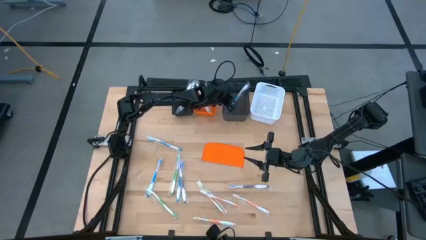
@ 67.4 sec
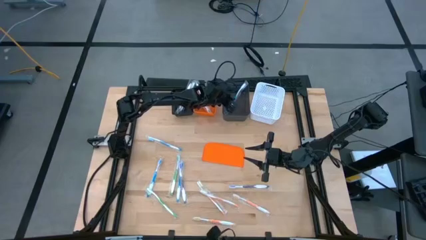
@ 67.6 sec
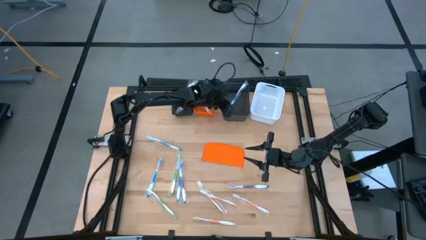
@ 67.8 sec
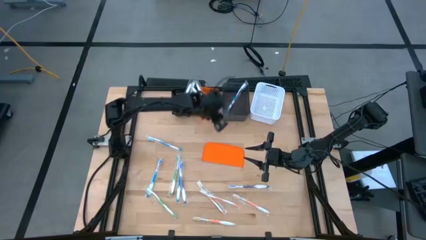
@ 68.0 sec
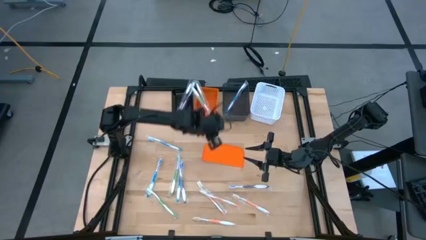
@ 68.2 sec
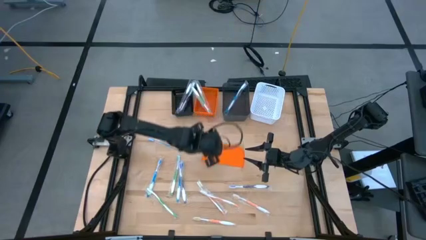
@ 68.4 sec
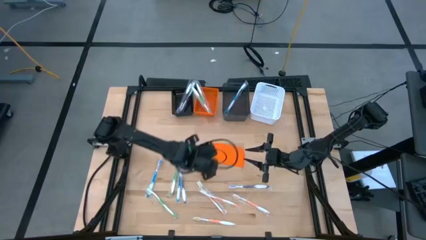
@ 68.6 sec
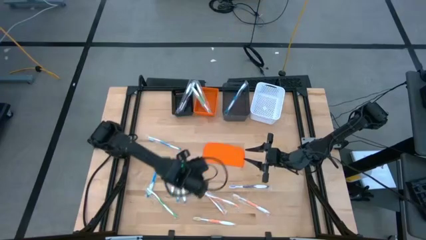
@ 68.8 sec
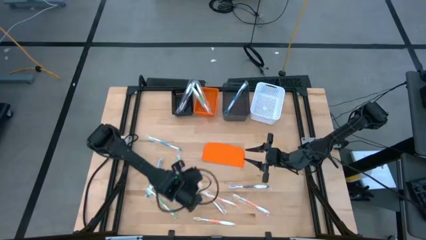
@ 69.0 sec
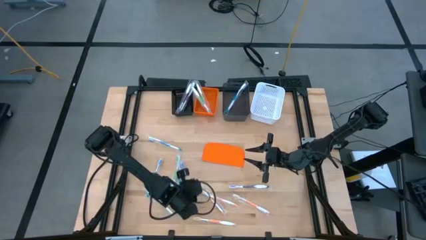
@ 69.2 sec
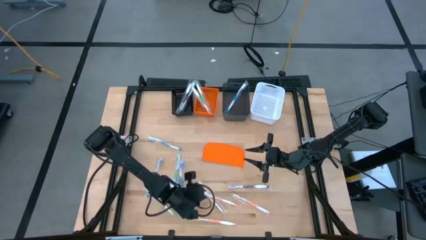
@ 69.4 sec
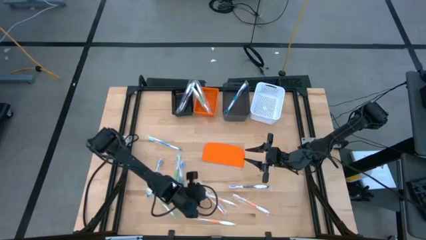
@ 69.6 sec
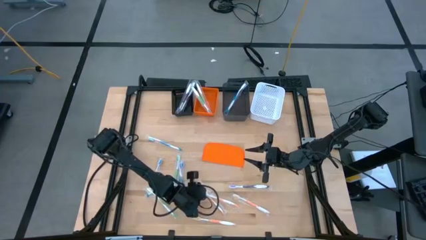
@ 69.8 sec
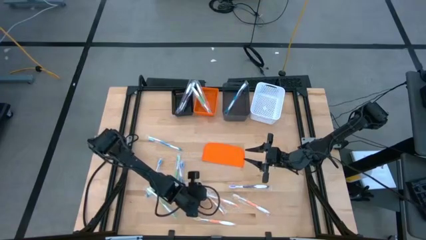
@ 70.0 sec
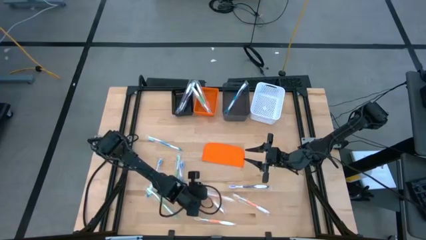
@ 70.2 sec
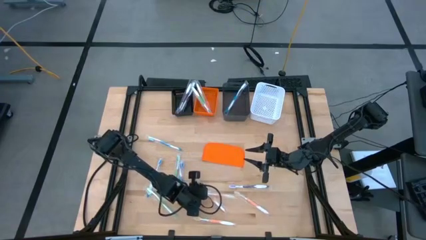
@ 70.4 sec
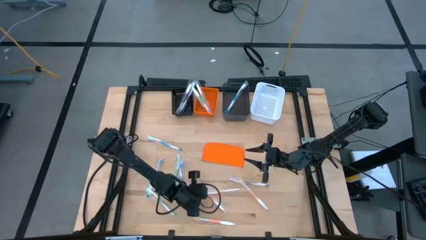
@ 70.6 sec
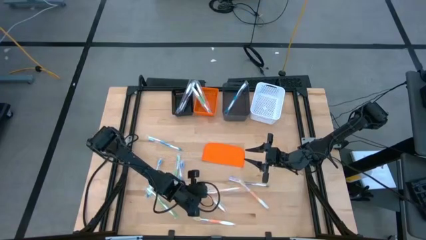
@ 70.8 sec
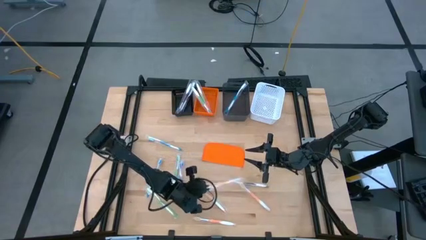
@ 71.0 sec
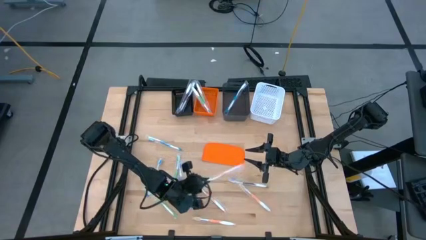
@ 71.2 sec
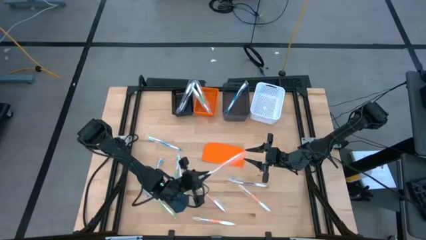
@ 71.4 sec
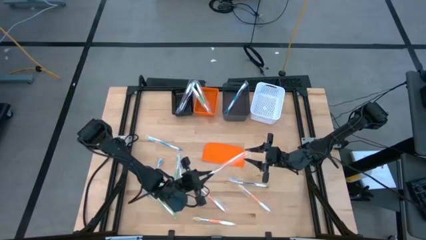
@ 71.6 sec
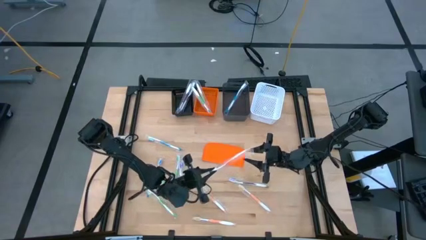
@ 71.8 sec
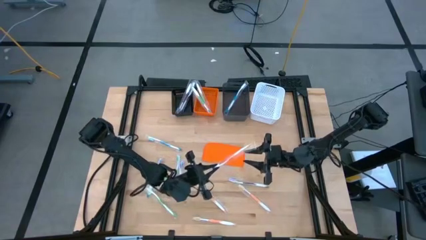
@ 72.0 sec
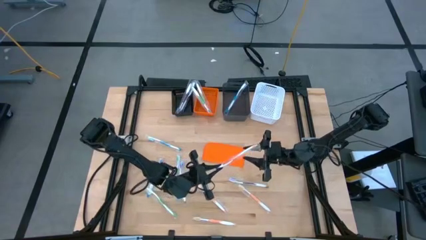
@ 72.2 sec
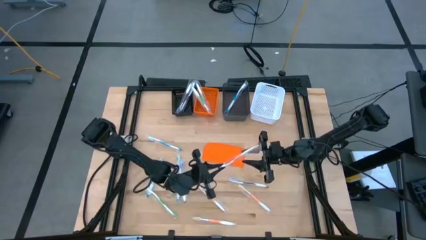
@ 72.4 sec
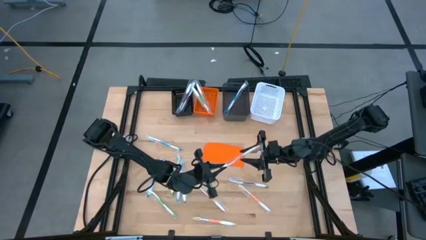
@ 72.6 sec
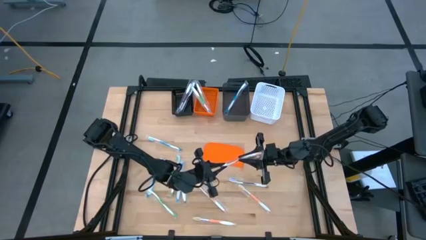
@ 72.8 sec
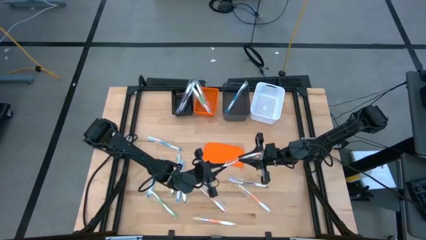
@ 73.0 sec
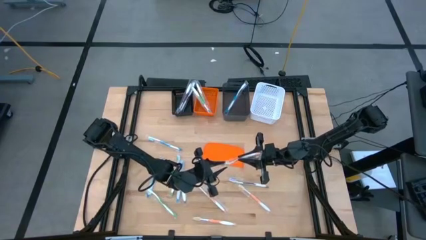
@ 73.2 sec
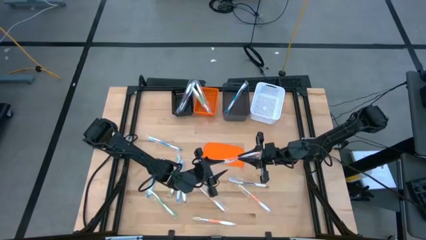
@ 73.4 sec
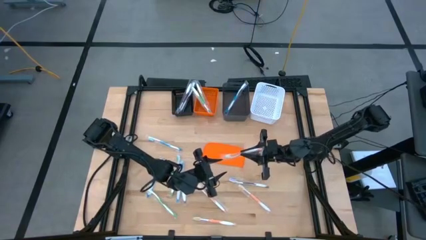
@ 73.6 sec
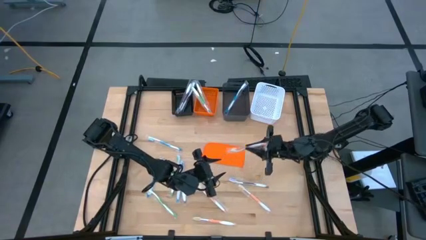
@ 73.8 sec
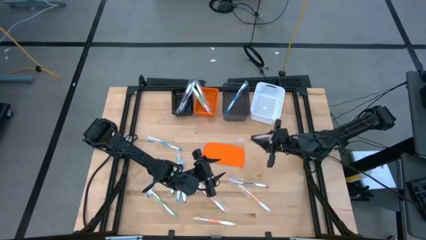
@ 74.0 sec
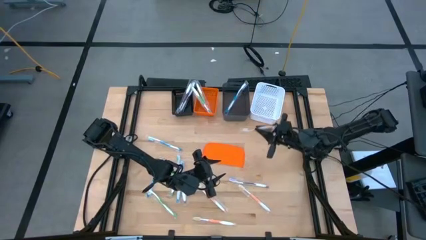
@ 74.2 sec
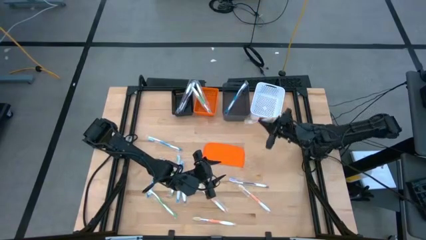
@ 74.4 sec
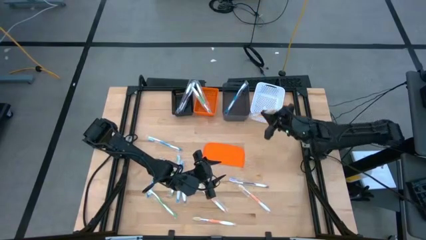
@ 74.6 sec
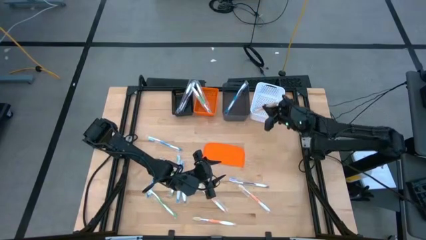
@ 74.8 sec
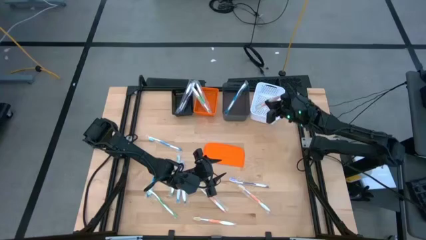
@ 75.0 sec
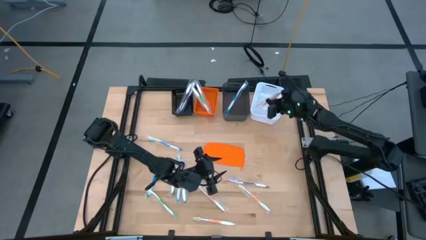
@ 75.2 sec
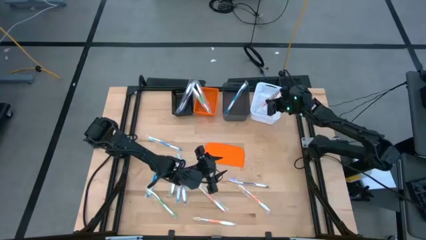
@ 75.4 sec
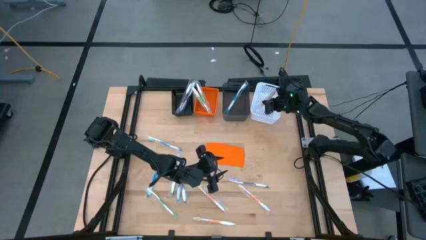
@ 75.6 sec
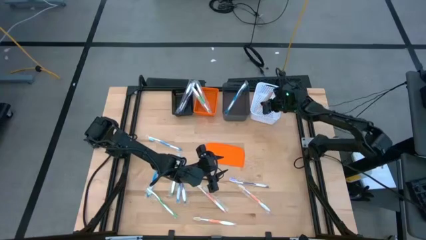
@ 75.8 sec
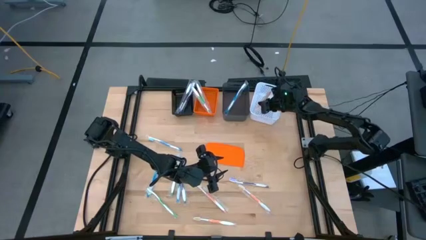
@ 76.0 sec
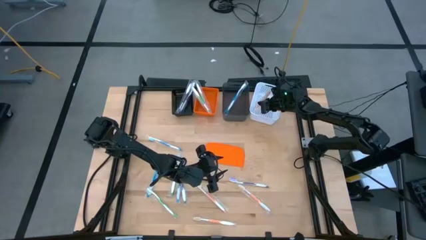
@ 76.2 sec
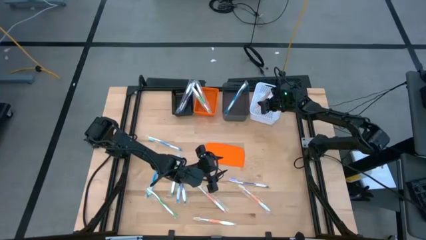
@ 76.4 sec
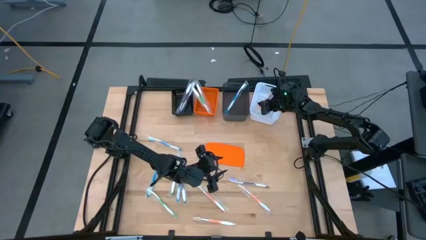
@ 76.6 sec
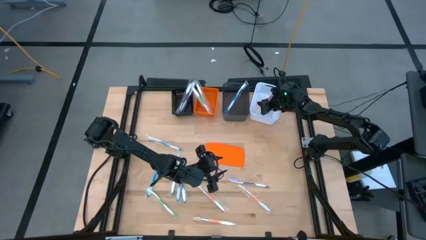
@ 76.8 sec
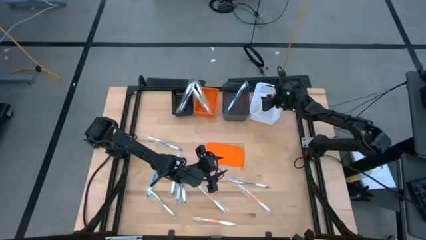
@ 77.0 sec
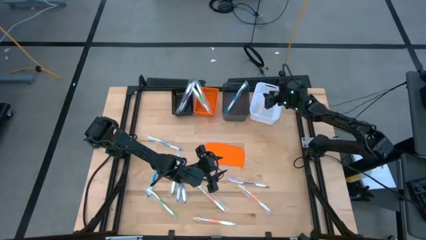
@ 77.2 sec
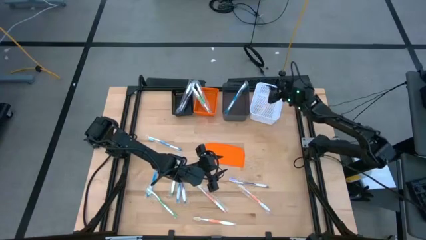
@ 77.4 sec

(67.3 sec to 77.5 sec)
Task: Pick & Place Toothbrushes
Put the orange toothbrush into the white bin

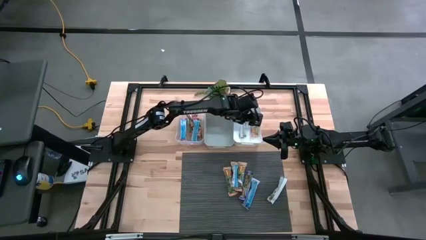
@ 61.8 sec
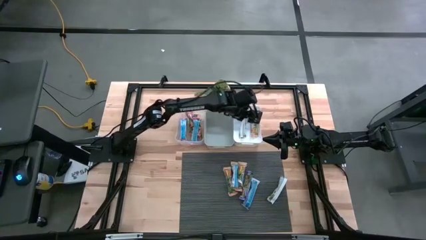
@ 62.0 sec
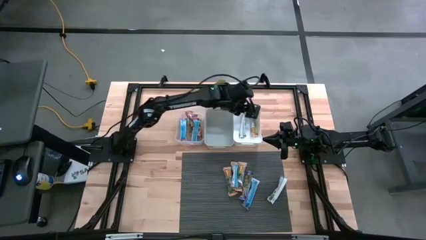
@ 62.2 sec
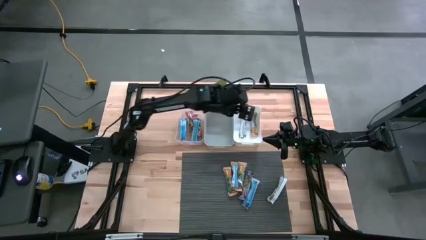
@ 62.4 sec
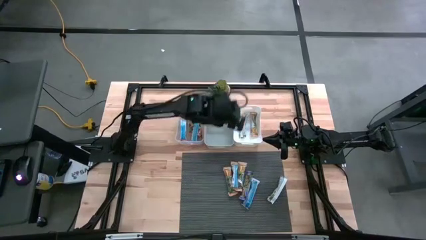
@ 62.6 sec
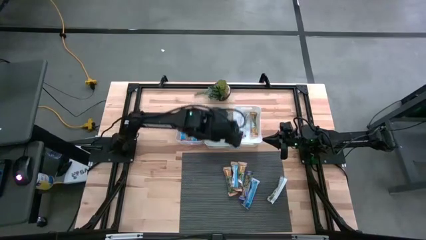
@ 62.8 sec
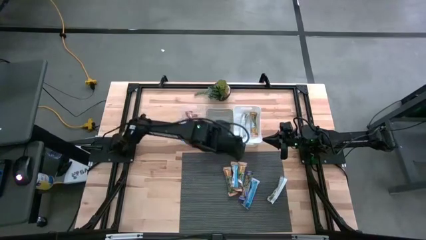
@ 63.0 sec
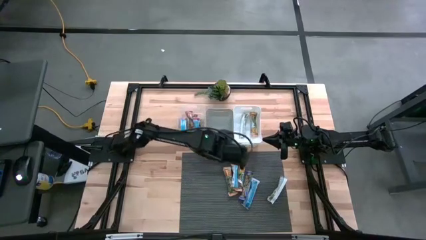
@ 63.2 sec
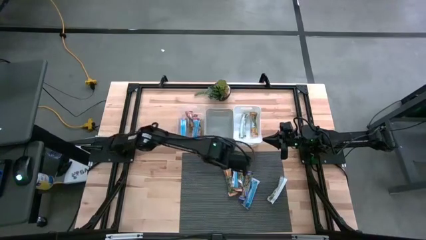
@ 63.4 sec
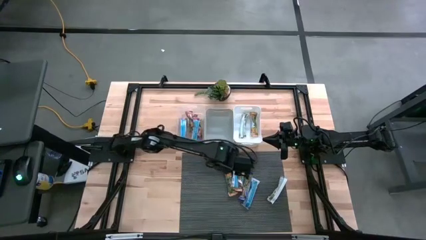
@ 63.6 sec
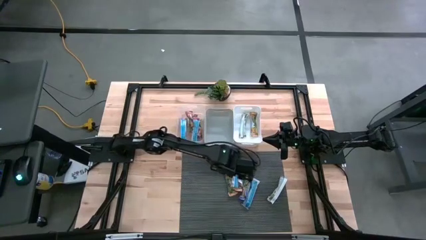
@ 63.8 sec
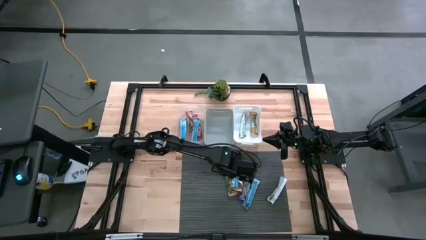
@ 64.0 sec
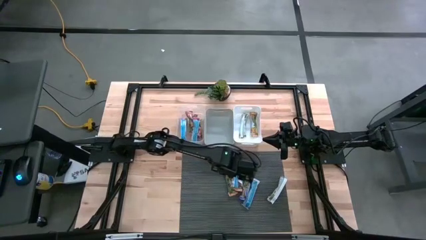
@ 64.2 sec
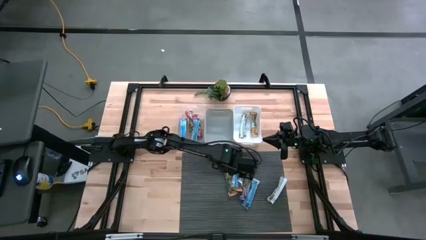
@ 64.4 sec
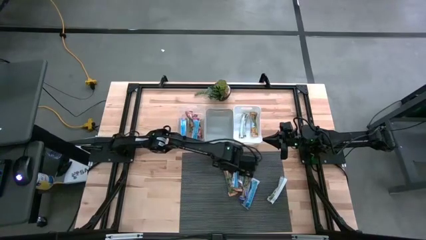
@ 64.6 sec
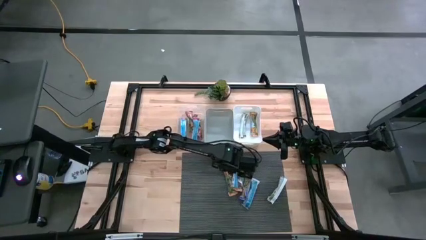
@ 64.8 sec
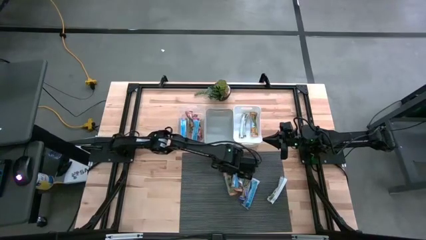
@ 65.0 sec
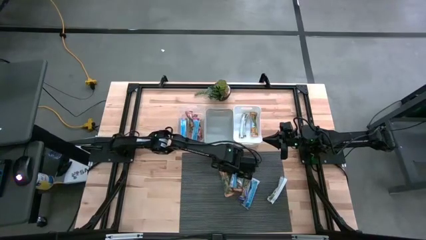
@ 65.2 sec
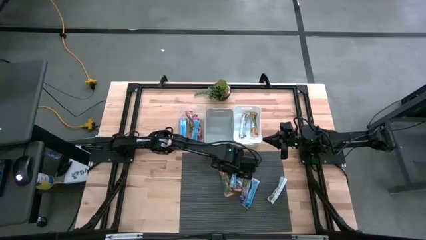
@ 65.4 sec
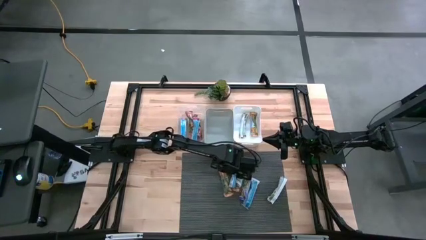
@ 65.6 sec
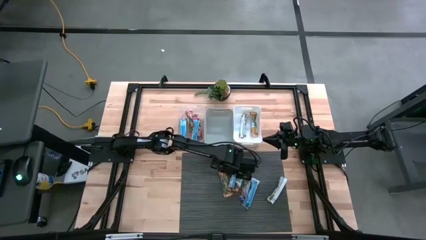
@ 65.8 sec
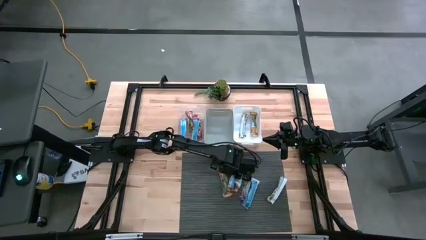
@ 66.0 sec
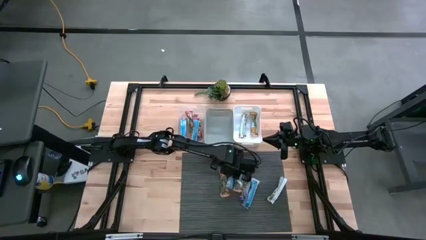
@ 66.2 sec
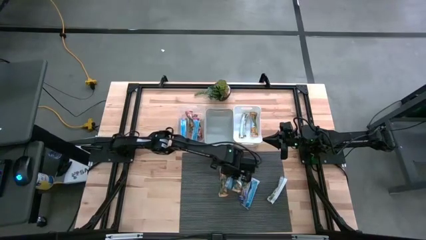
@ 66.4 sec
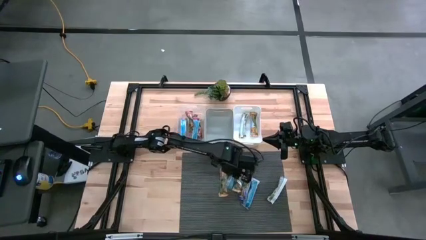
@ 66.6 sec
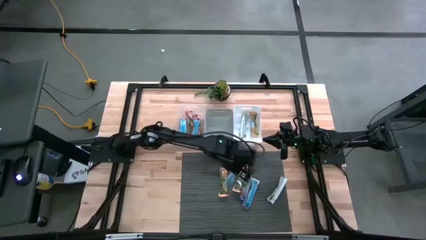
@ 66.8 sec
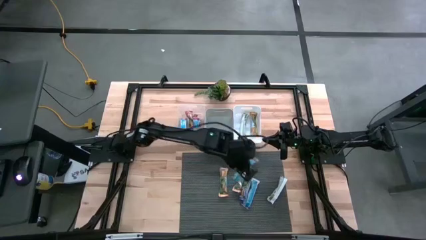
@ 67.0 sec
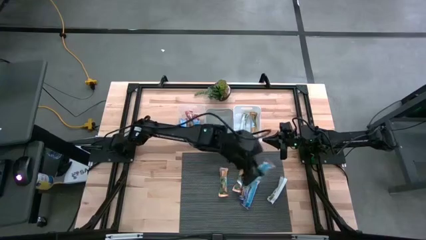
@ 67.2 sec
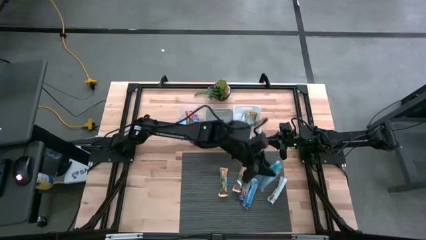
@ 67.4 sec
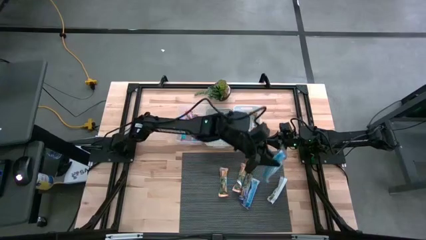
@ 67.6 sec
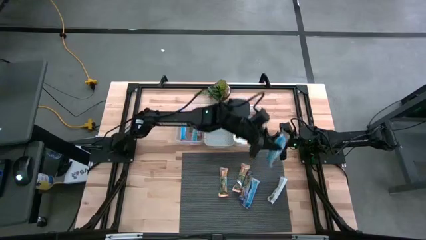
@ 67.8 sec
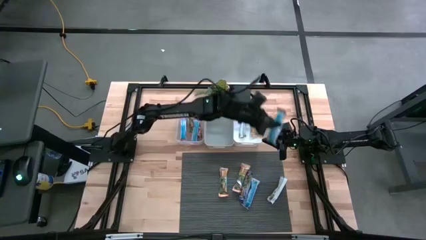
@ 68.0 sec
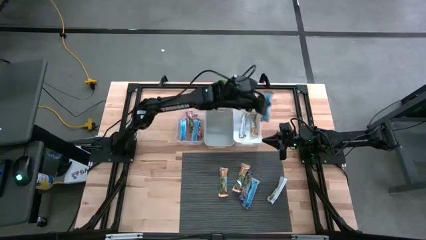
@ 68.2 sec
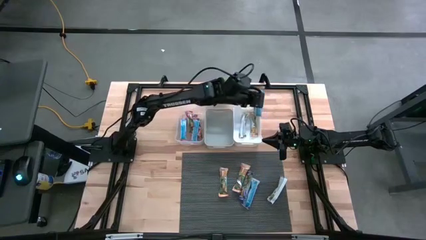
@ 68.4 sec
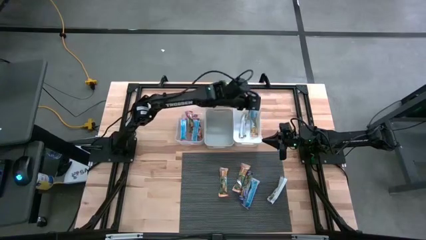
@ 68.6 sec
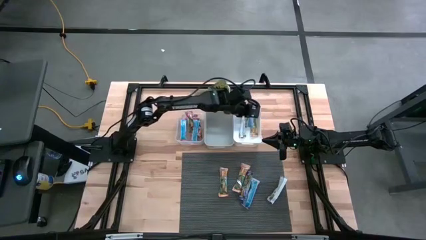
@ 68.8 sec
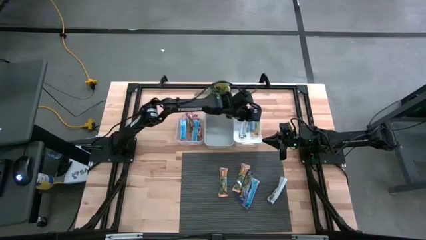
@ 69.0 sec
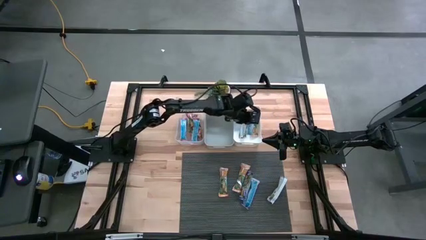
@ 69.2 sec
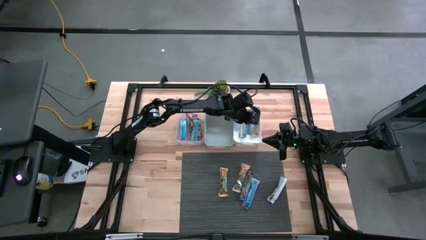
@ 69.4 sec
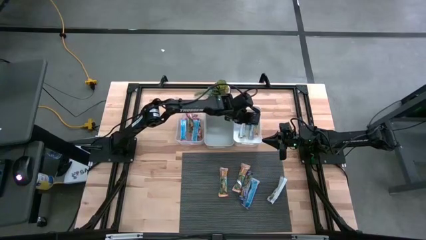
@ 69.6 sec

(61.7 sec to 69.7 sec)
Task: Pick and place Granola Bars by type
Put the yellow granola bar into the white bin
